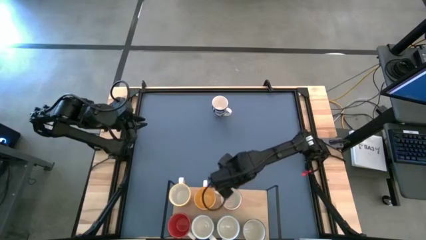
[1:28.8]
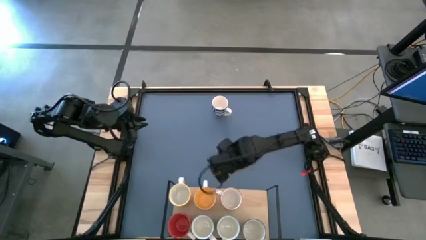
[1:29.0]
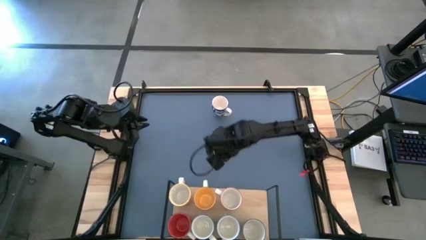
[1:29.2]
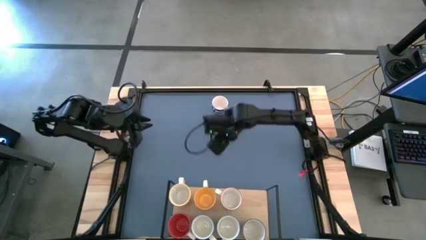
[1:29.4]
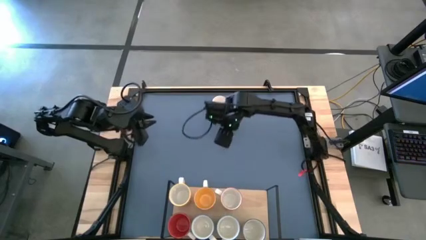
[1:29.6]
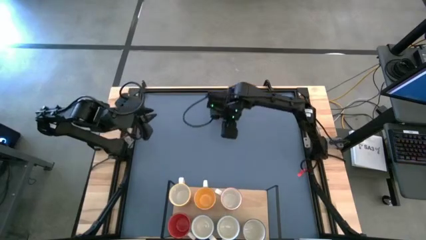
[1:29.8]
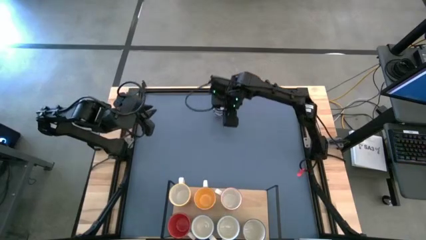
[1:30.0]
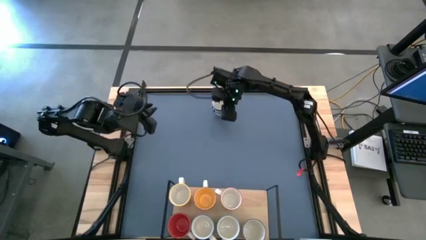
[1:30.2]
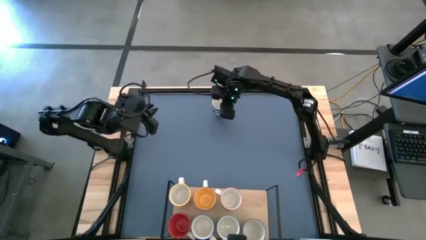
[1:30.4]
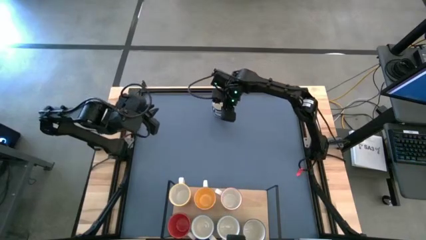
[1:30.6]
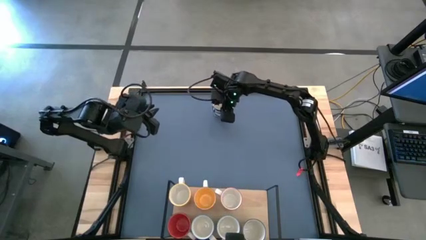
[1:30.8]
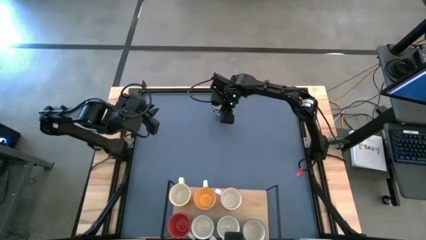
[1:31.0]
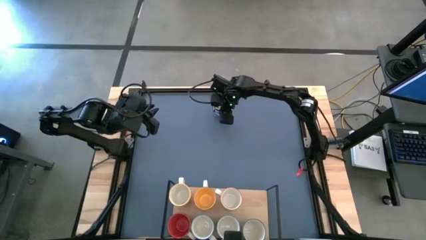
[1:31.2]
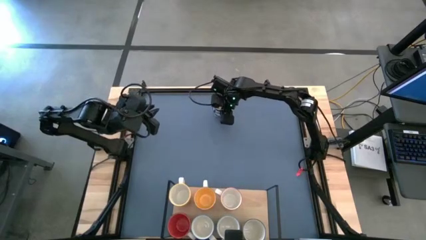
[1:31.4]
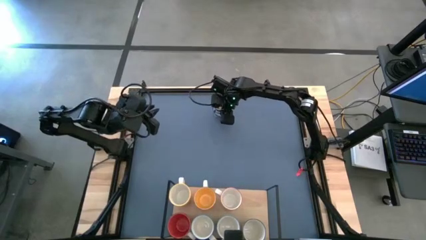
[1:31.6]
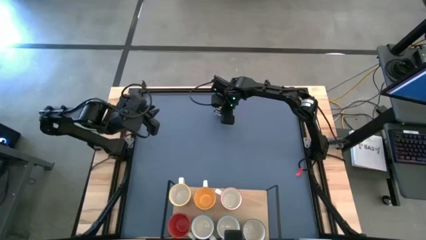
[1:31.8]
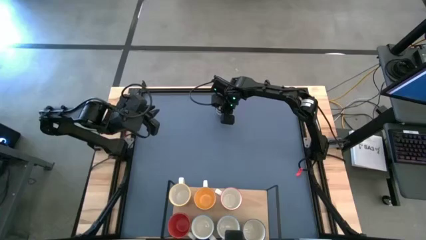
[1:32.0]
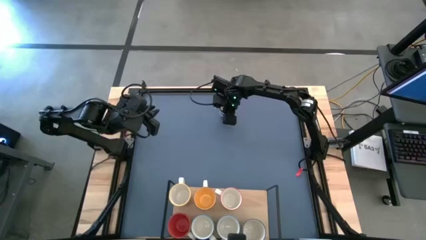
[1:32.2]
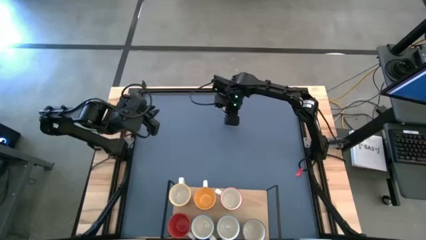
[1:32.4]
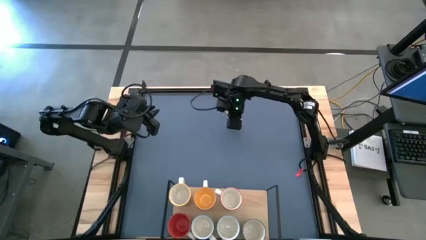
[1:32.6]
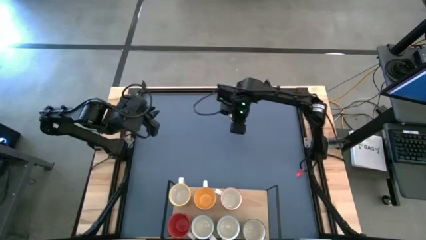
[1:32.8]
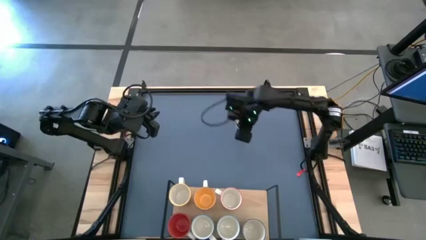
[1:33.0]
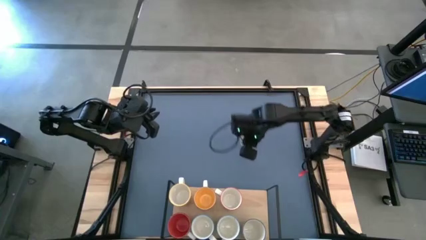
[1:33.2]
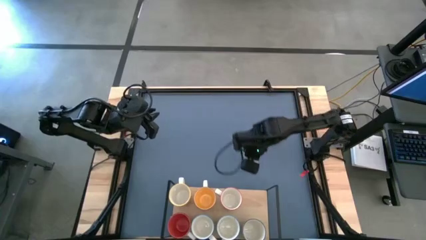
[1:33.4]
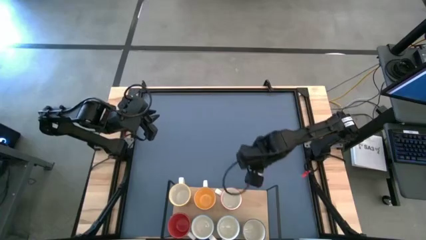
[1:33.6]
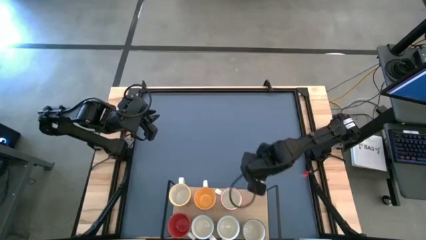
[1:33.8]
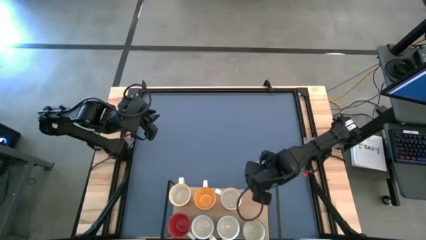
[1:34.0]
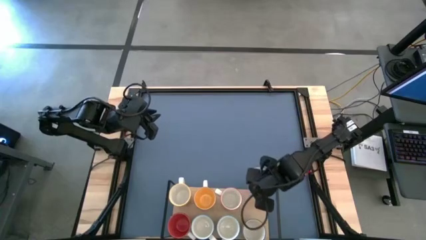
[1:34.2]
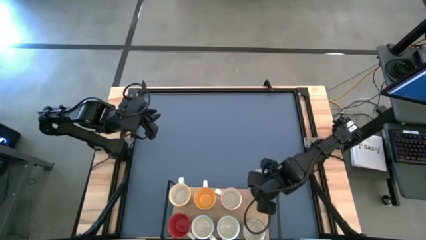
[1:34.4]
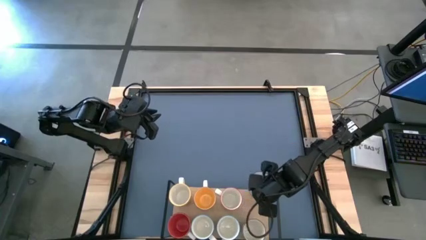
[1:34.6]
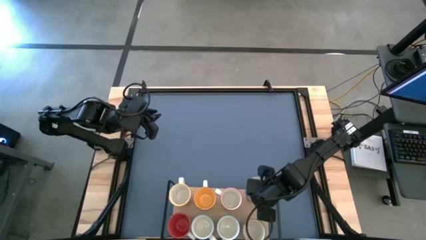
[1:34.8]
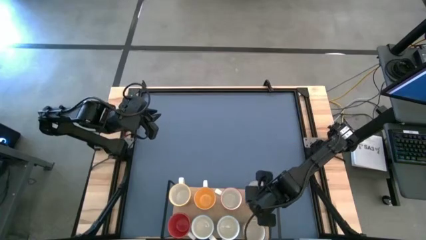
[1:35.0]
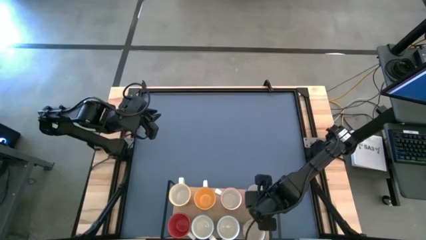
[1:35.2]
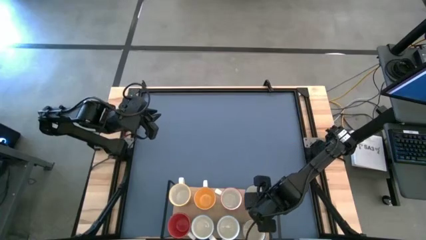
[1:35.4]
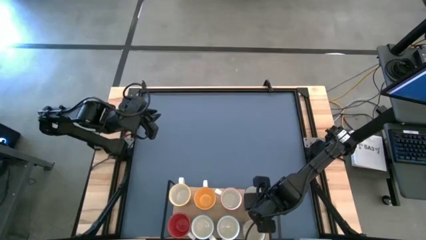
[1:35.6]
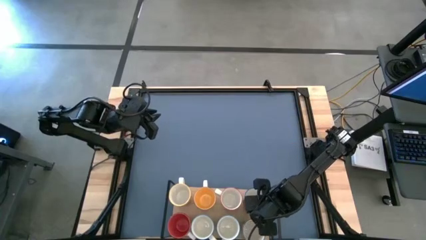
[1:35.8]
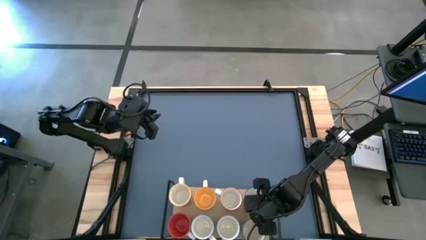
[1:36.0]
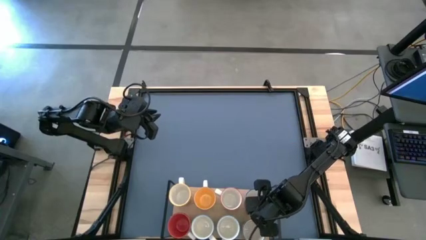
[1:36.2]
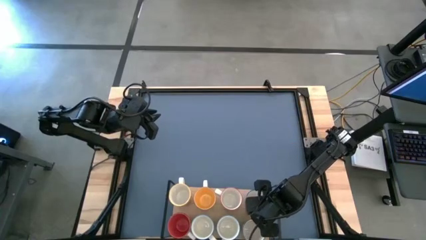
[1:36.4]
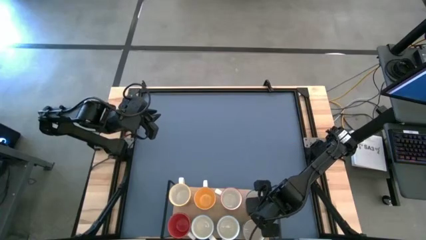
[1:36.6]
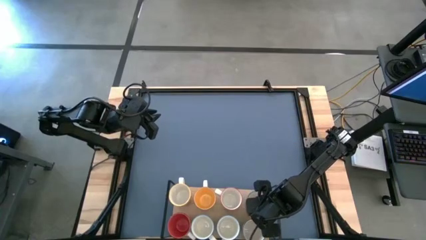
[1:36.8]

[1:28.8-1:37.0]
Task: Place coffee mugs
Put the blue mug on the shelf

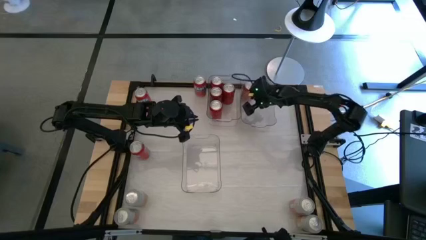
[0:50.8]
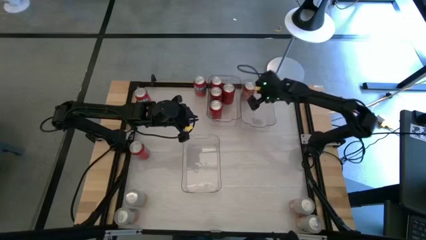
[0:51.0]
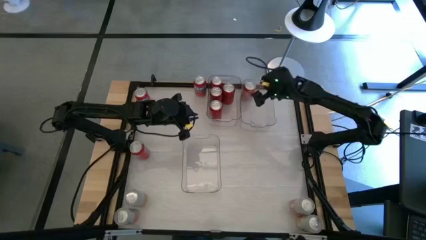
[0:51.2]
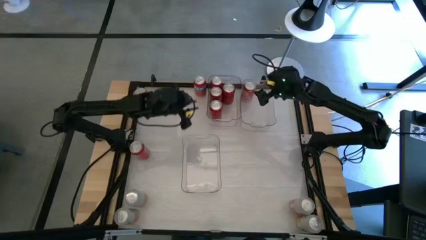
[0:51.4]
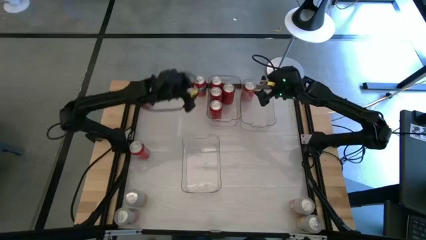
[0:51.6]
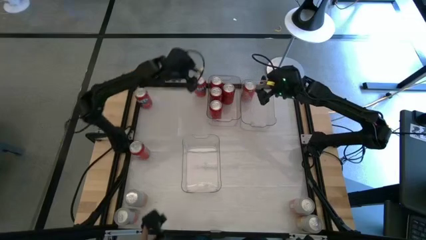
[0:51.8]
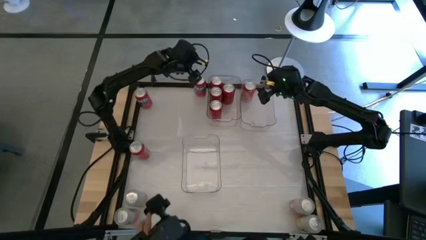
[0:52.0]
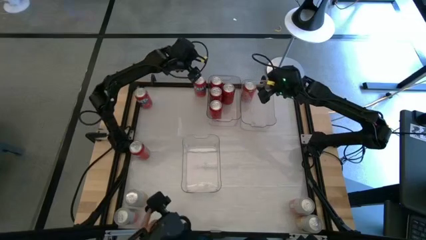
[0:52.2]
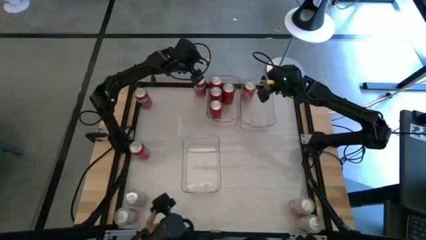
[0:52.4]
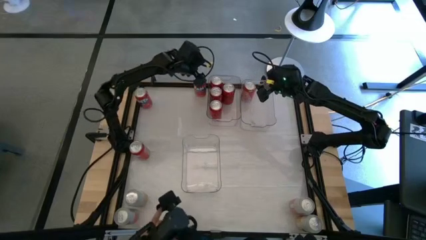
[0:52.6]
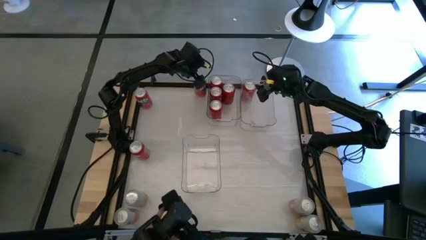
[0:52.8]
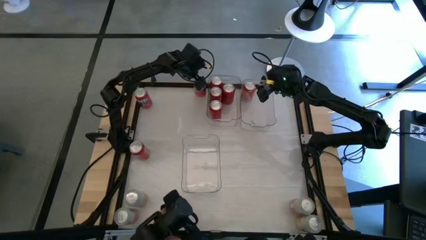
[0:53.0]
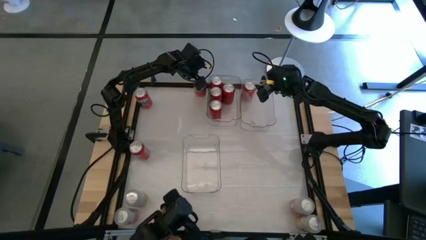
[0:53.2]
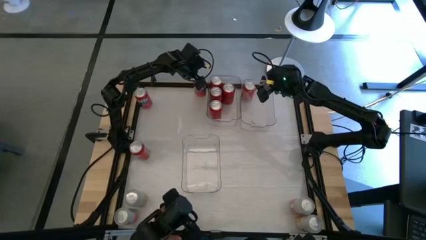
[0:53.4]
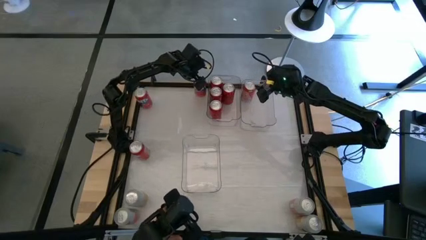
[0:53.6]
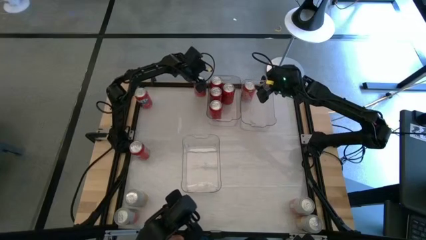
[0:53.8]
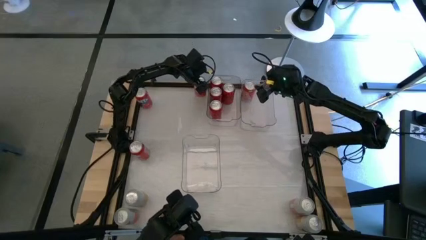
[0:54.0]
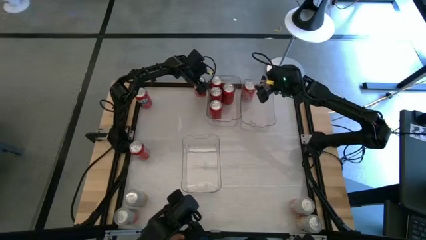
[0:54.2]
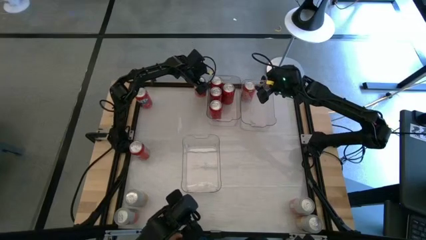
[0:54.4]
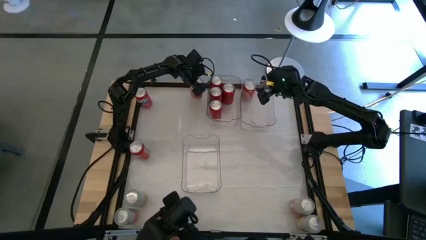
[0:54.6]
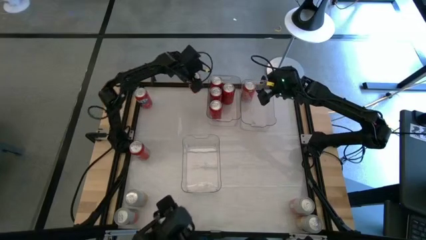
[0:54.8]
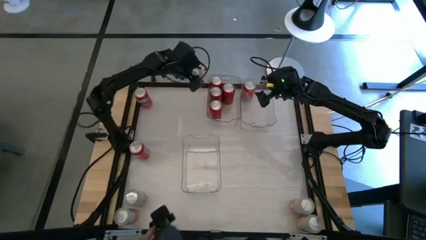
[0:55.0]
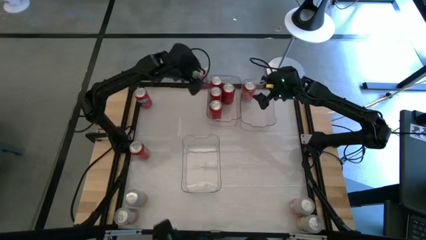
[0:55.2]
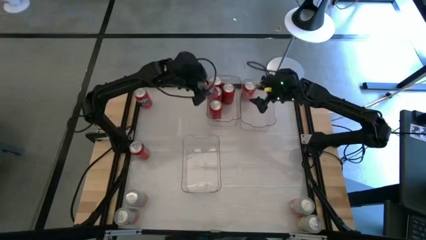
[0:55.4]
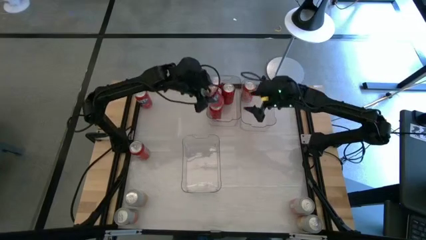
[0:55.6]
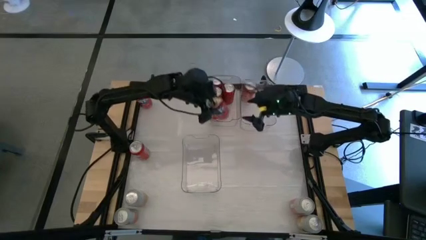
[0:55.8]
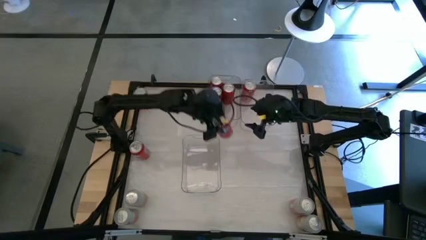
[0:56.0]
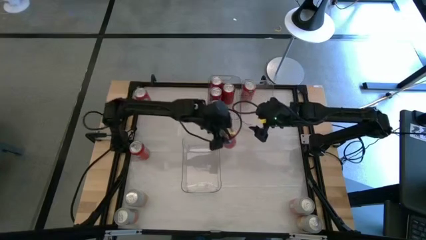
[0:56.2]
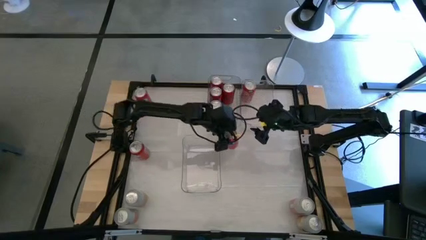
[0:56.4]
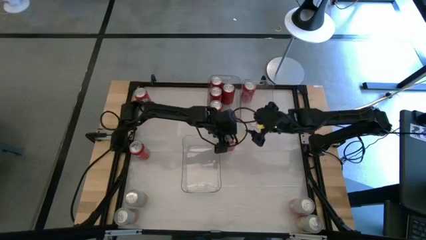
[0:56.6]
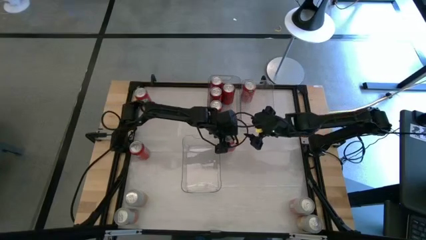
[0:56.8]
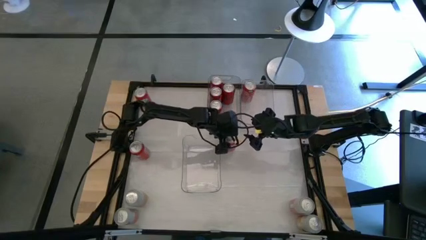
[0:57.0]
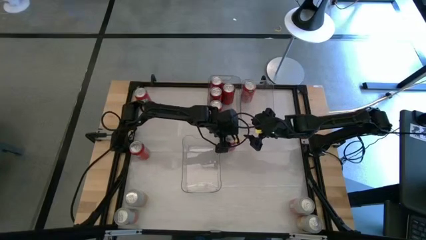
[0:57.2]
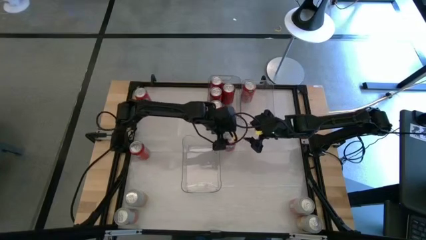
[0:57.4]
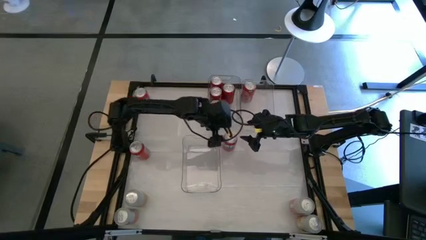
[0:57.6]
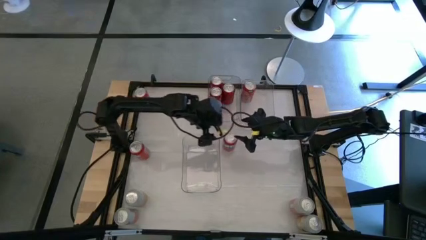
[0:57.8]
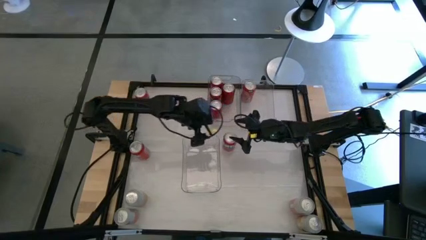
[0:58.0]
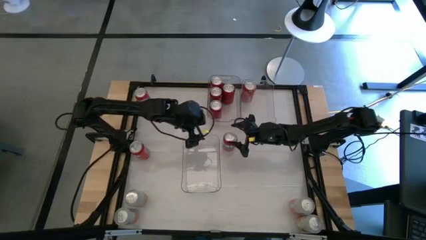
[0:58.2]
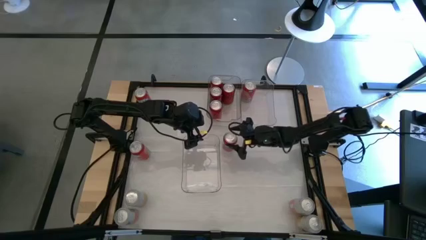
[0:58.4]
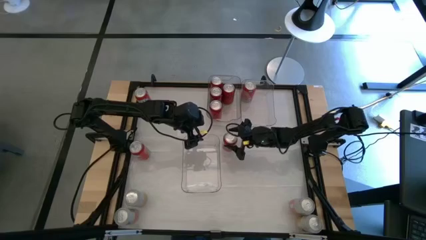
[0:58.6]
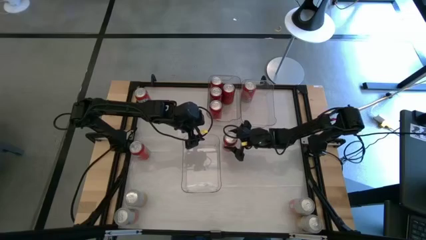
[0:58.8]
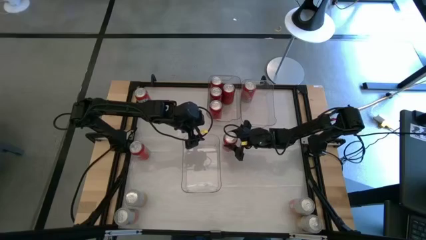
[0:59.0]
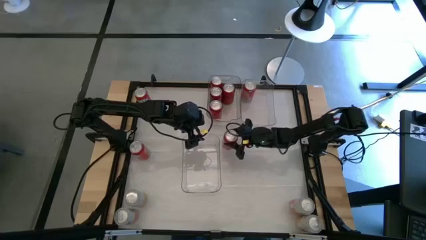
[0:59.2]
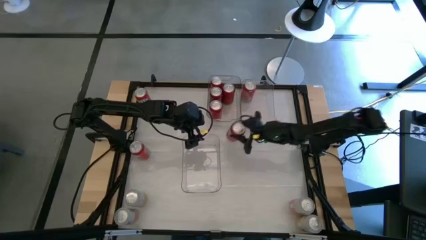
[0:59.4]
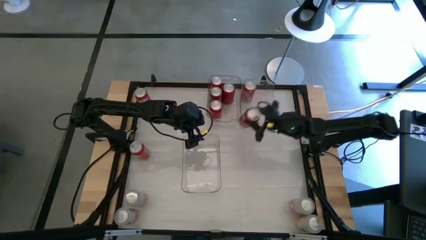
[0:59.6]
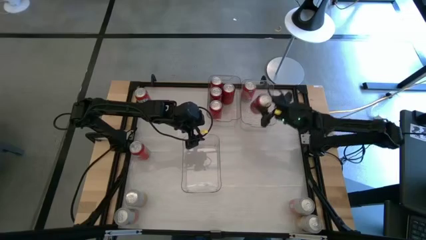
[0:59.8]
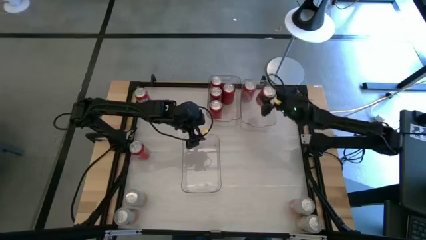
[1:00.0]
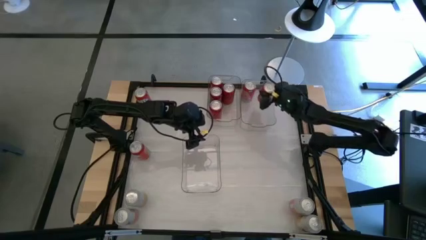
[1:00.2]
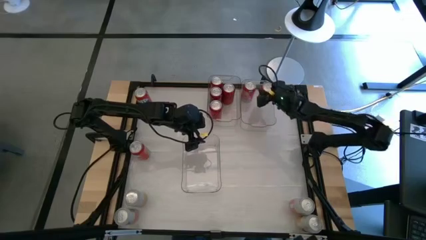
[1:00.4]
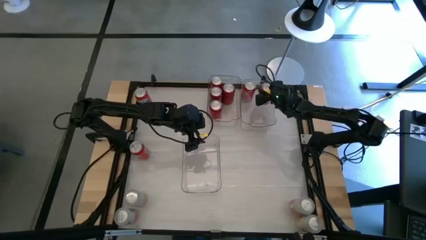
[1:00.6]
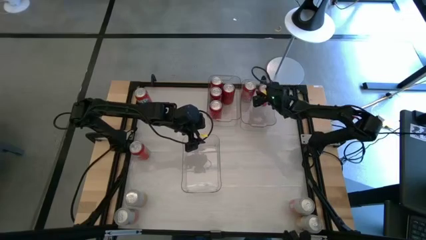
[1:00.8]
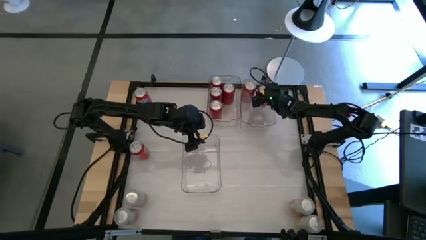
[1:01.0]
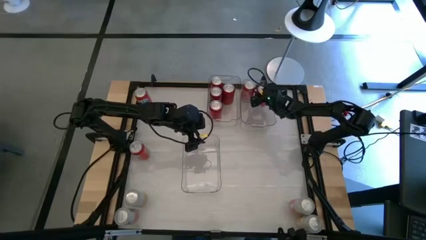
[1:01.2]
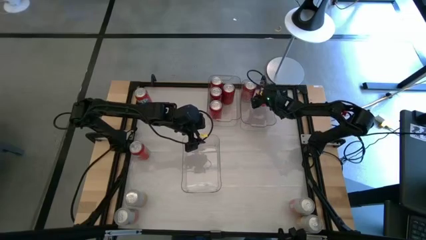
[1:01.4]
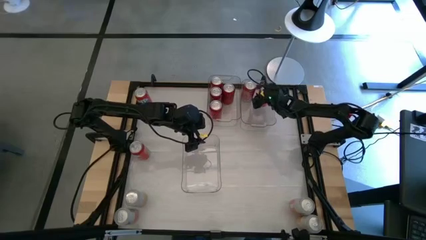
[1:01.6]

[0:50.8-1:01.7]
Task: Sort soda cans
Put the top right red soda can into the top right transparent bin
